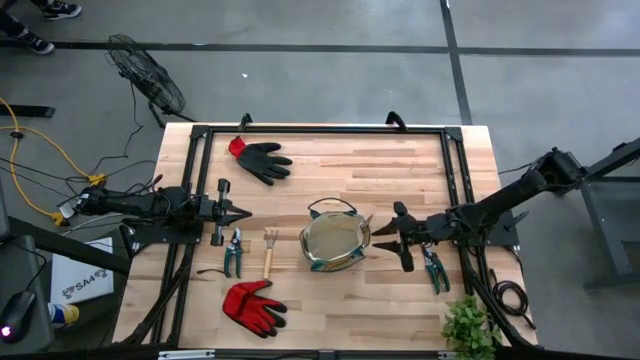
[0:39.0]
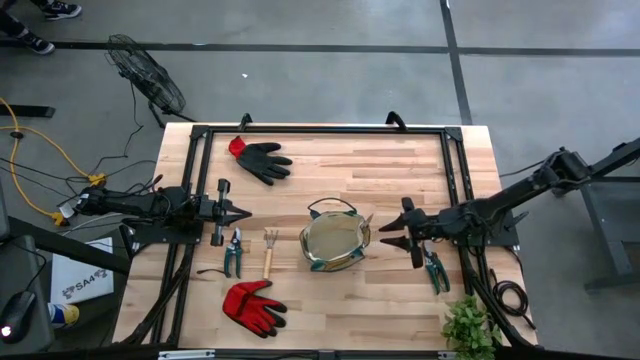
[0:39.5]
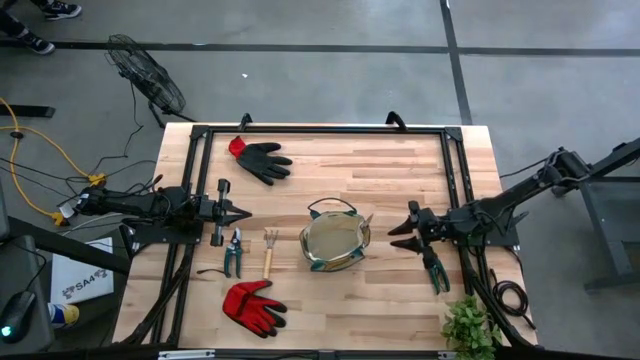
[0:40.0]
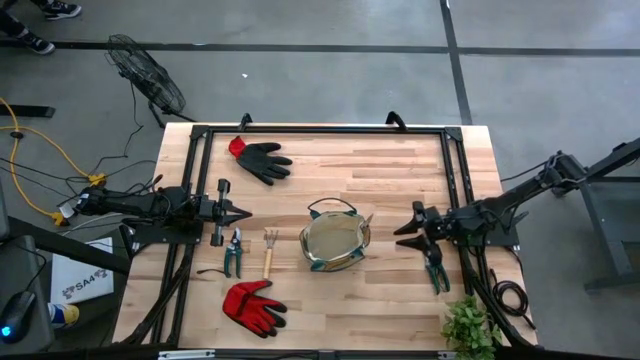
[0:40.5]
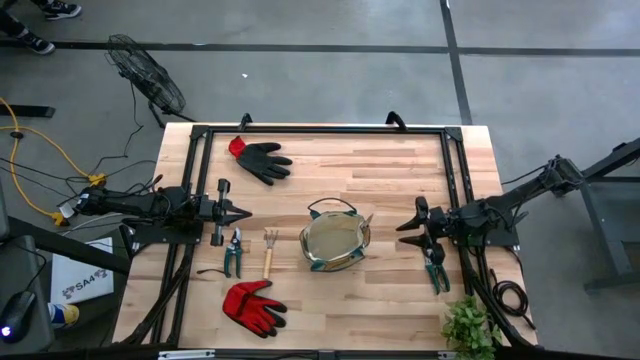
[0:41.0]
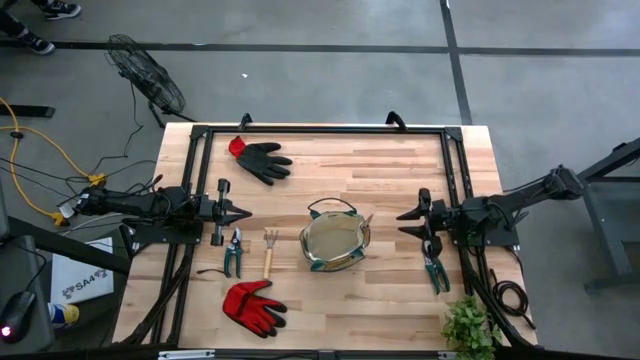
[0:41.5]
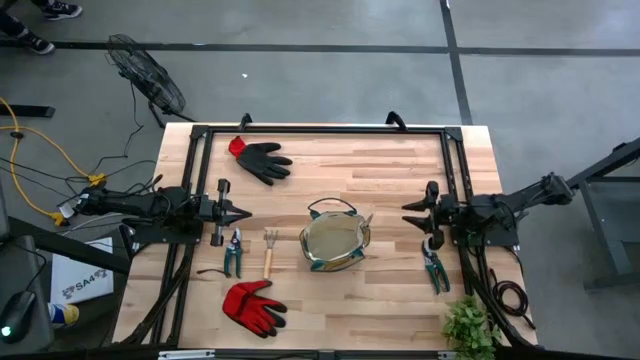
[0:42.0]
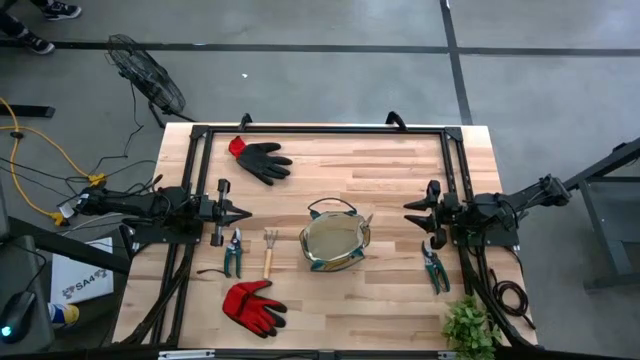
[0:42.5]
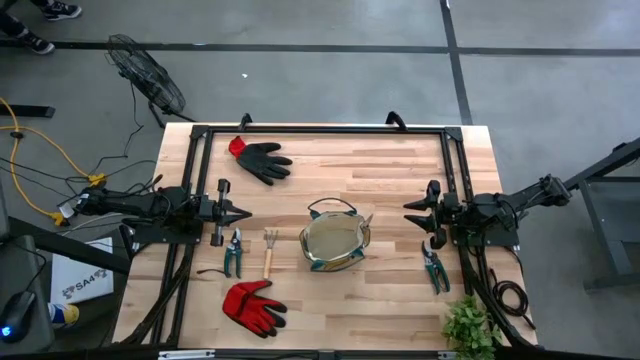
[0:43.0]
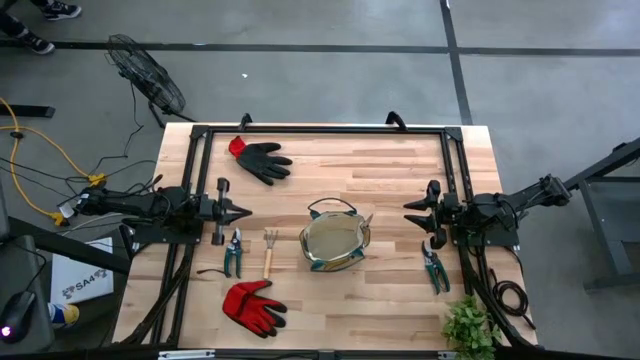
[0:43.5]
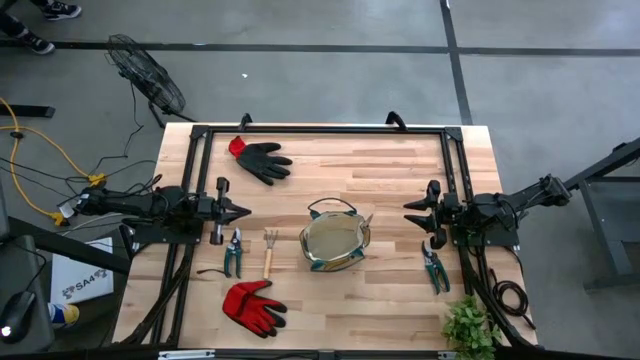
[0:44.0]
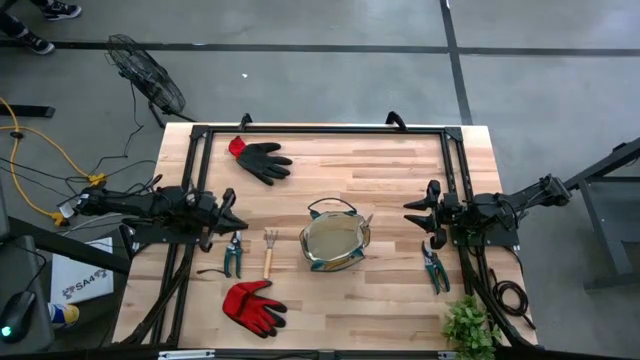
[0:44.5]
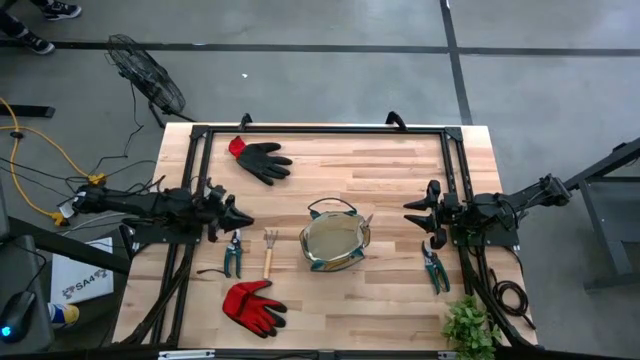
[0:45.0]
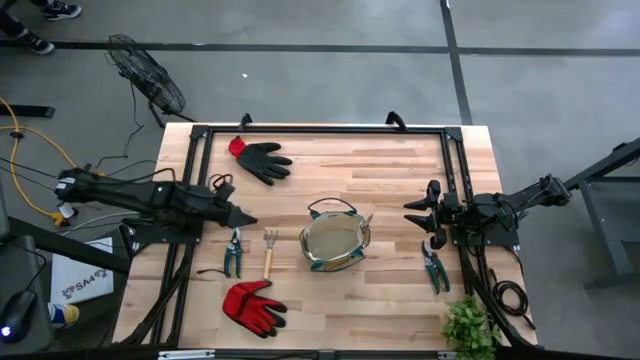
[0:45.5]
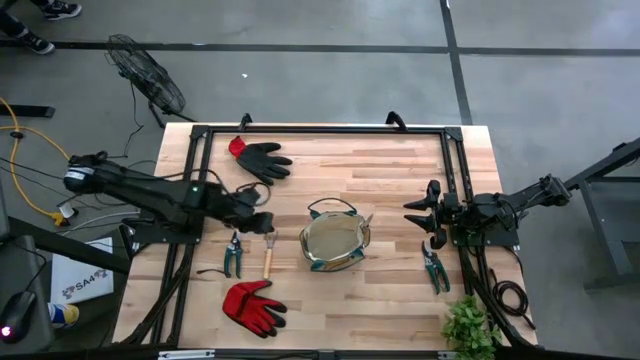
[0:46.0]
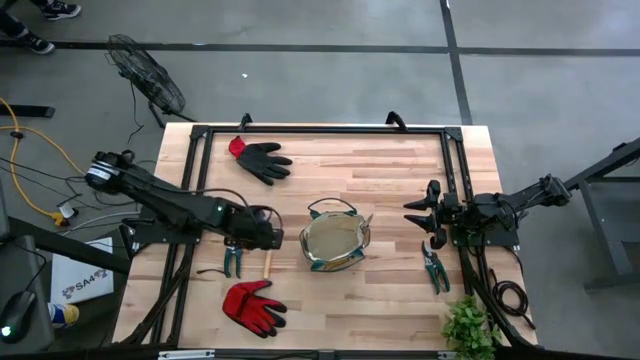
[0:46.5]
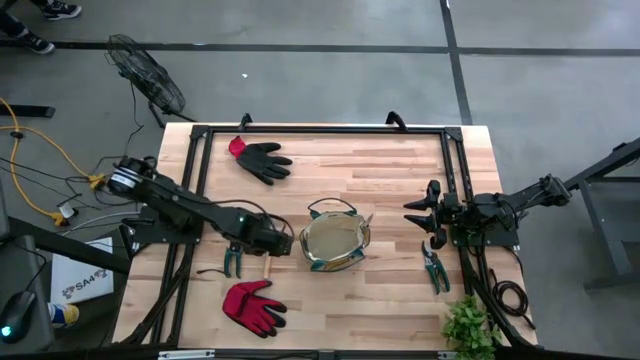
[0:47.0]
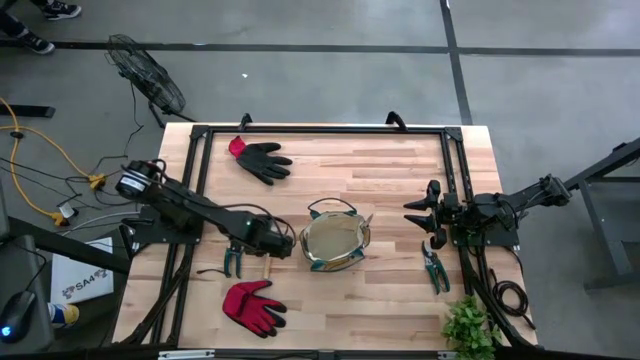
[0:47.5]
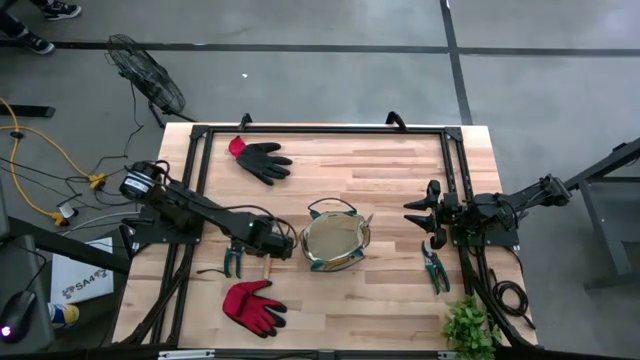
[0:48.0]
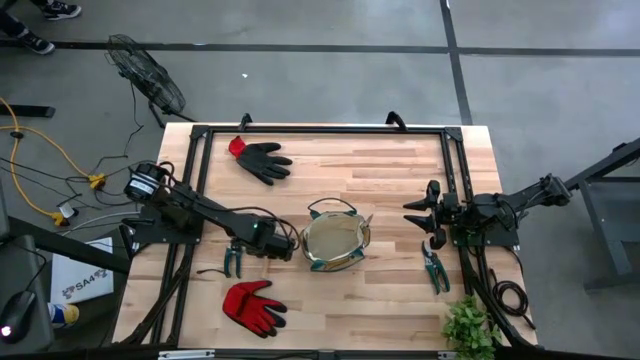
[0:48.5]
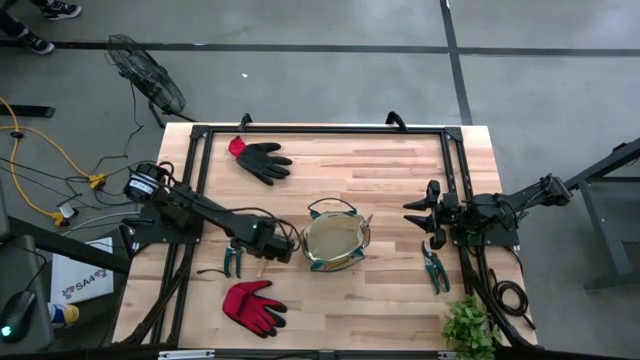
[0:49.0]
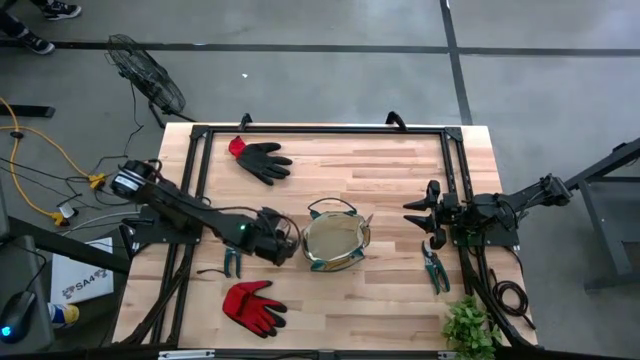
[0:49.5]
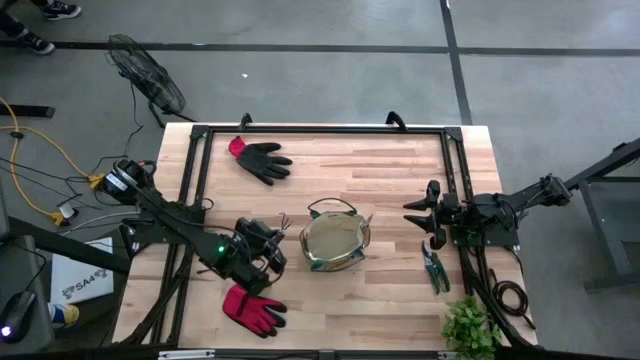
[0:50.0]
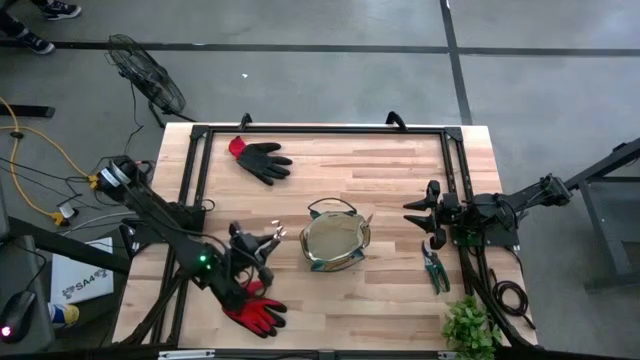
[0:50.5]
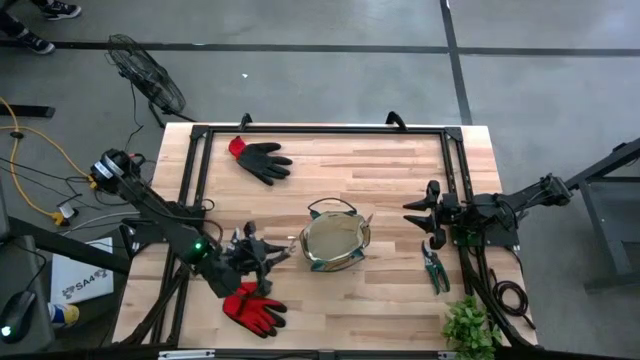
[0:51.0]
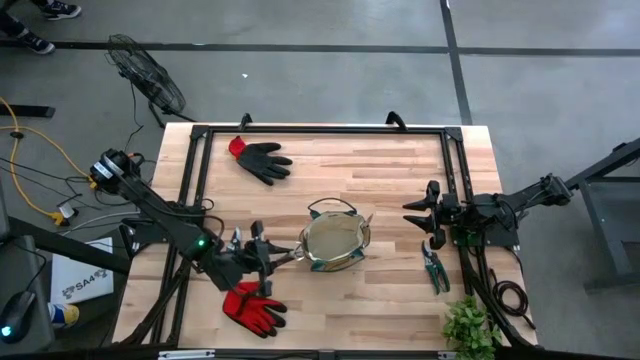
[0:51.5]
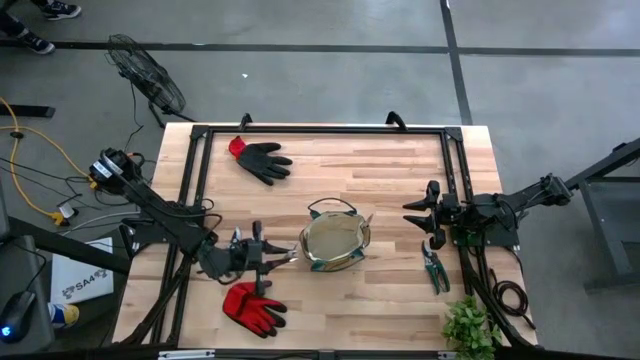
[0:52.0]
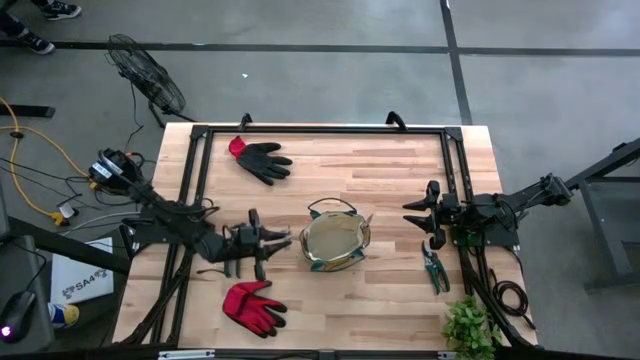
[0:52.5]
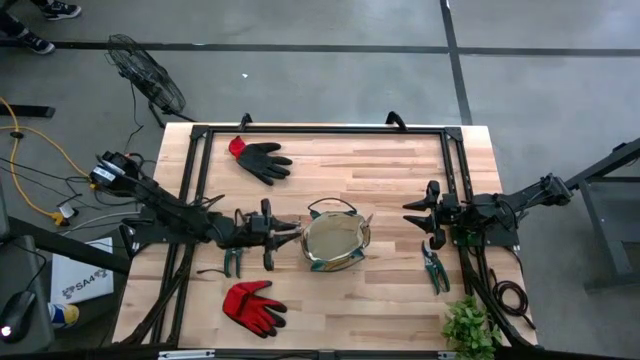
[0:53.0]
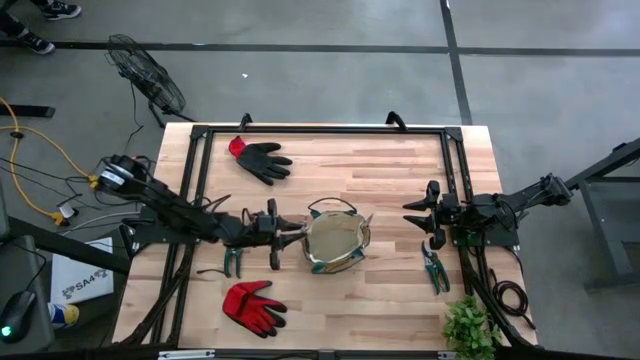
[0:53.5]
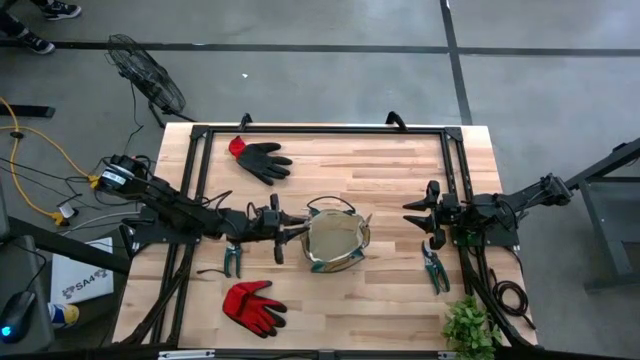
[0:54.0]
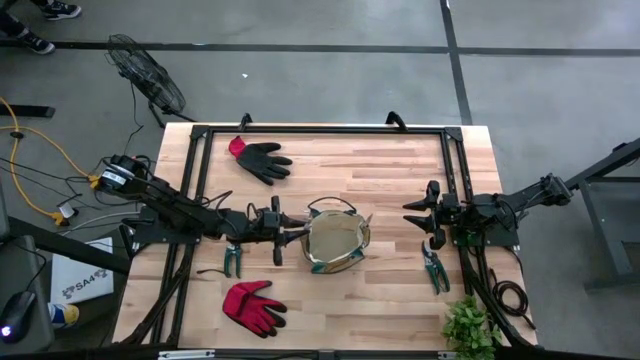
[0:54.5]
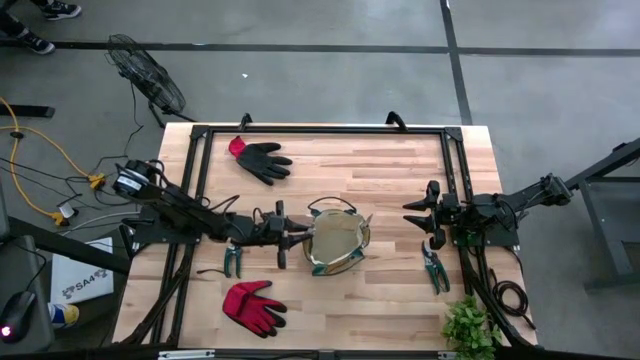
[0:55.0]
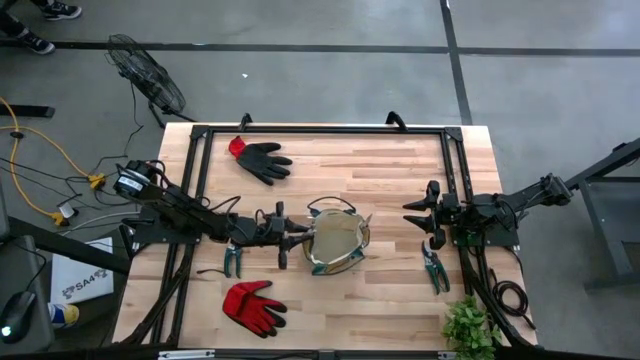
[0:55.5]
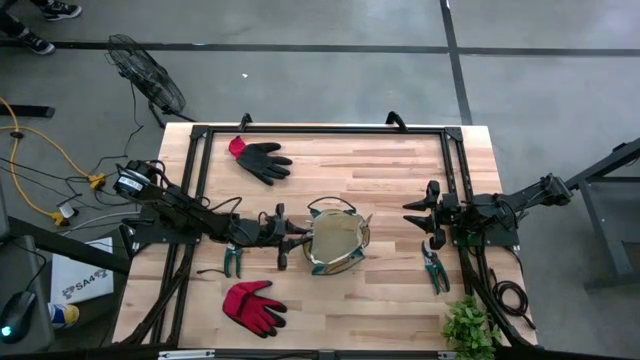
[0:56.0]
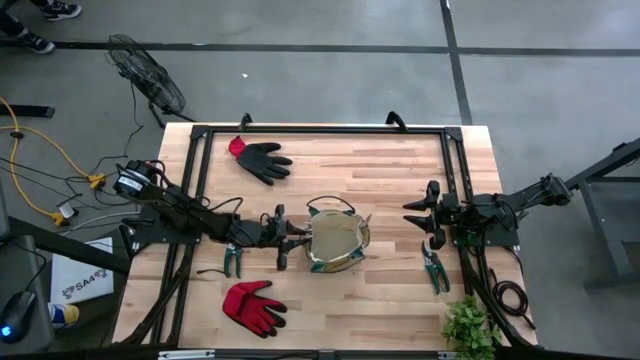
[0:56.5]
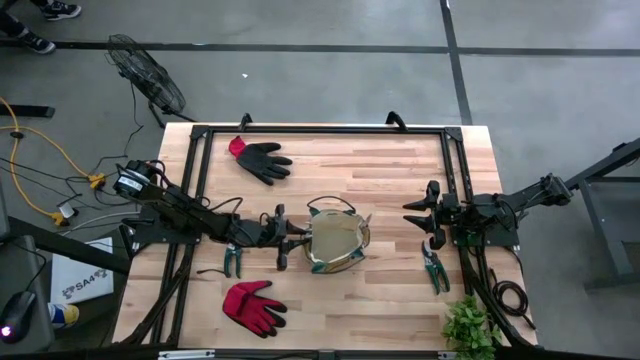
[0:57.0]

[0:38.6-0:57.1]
Task: Pick & Place Garden tools in Gardening bag
Put the brown hand rake into the gardening bag

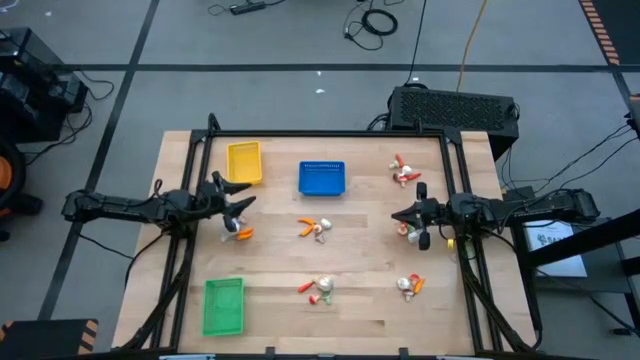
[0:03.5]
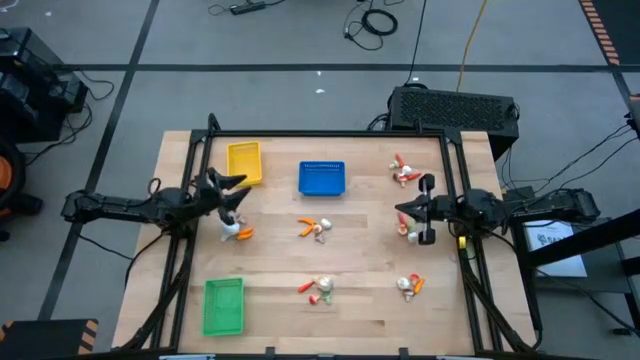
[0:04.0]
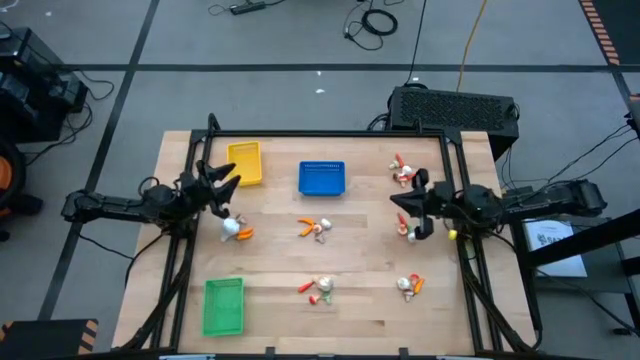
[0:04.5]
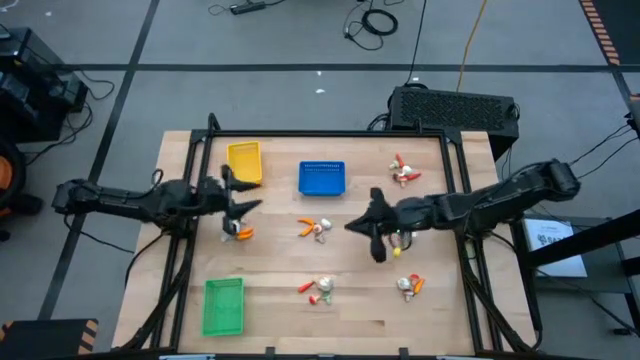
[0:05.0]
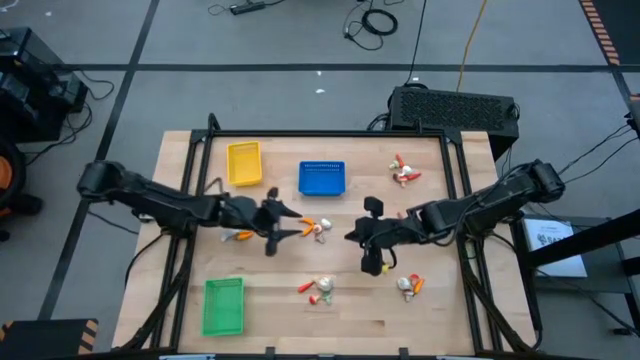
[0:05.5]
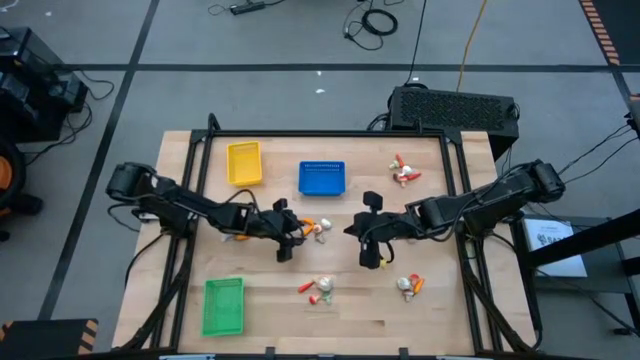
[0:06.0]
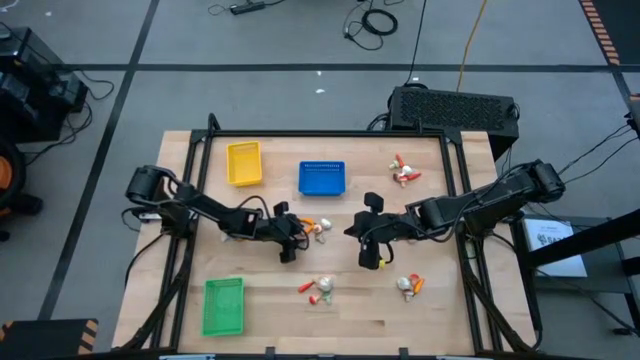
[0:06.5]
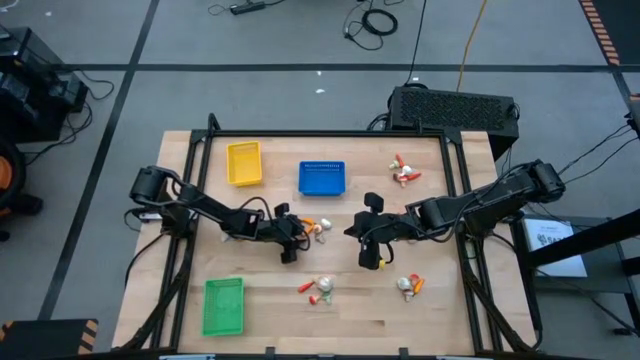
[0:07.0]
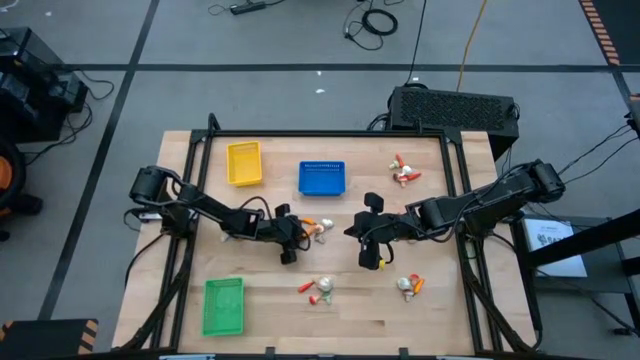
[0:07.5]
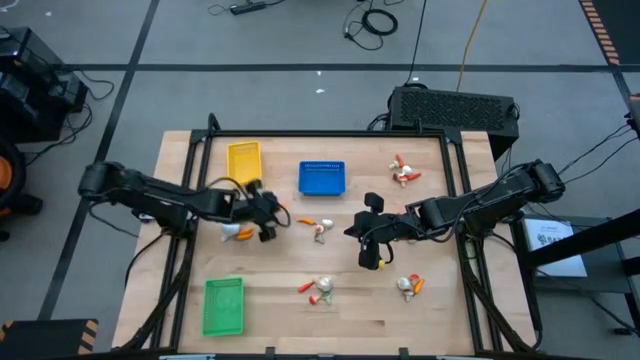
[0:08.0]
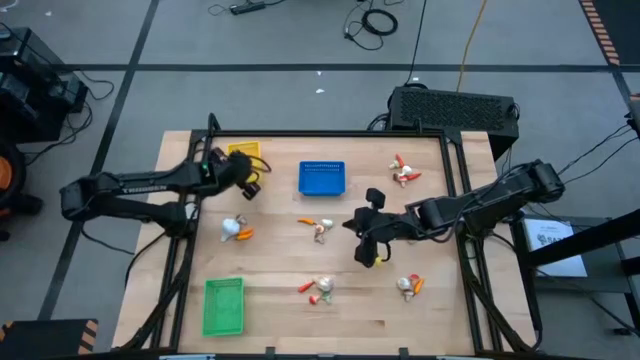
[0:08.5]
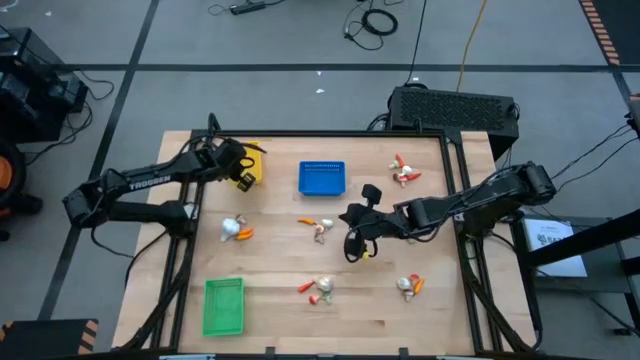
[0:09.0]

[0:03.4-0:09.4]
Task: Sort produce into baskets
Put the yellow chili pepper into the yellow bin
